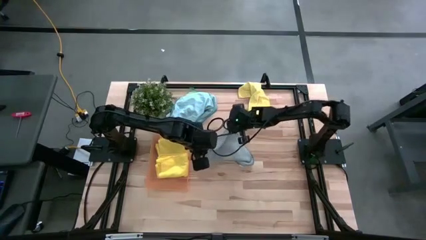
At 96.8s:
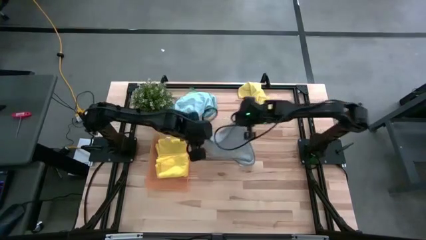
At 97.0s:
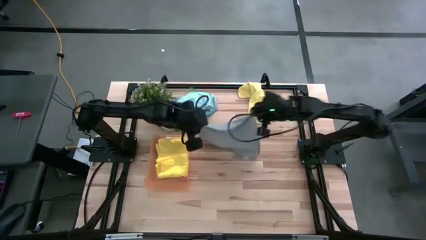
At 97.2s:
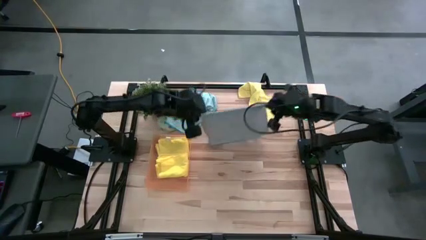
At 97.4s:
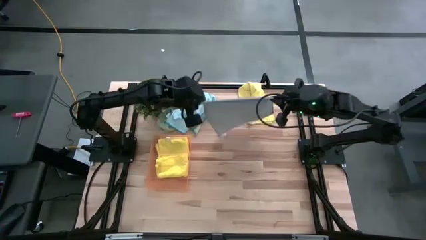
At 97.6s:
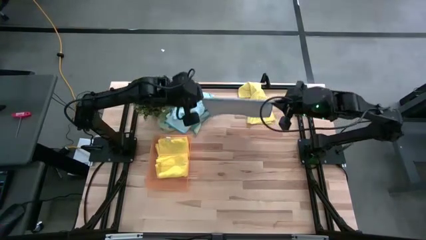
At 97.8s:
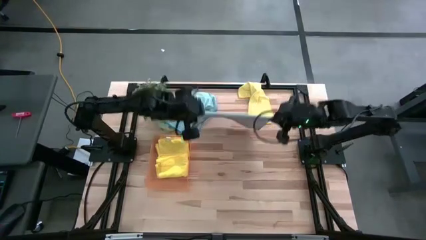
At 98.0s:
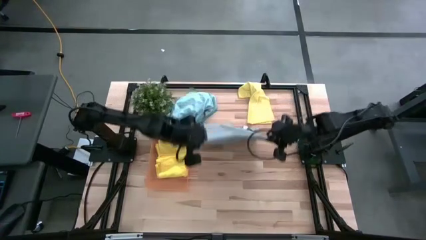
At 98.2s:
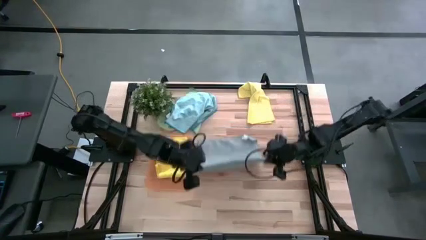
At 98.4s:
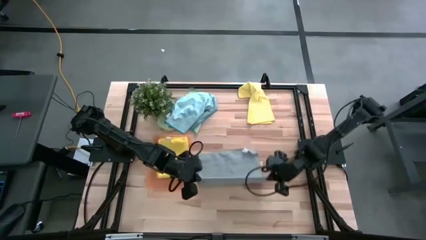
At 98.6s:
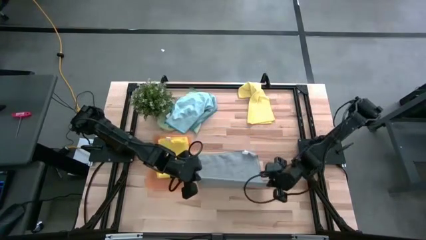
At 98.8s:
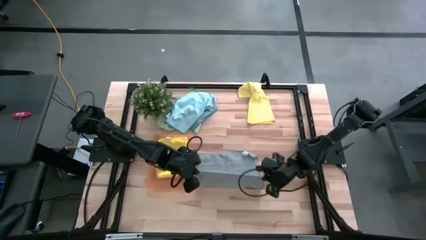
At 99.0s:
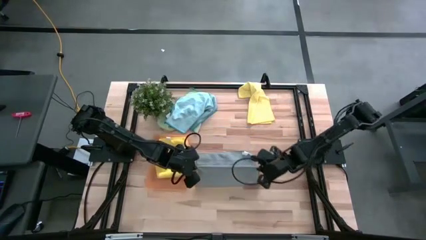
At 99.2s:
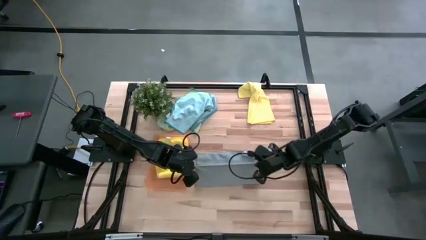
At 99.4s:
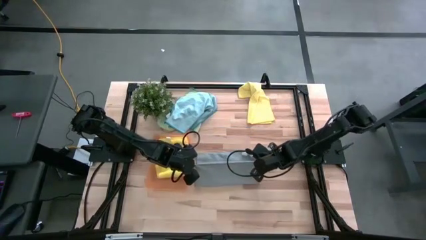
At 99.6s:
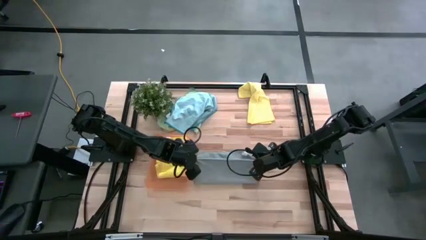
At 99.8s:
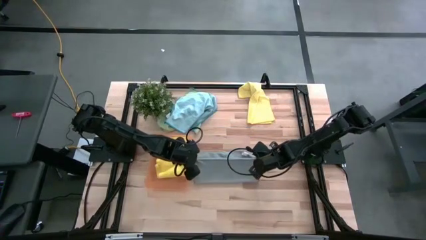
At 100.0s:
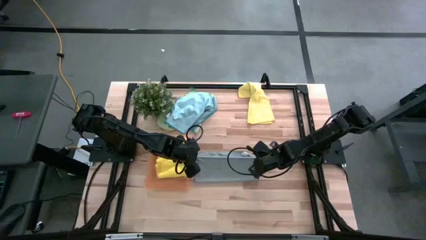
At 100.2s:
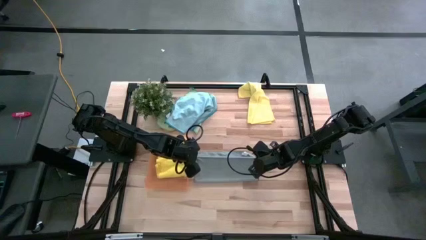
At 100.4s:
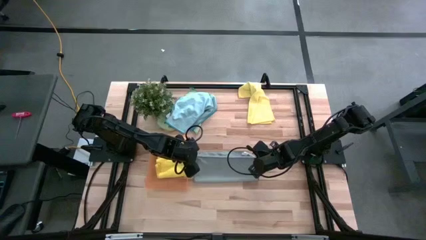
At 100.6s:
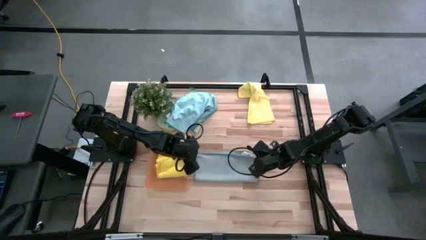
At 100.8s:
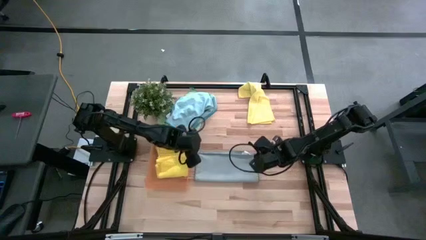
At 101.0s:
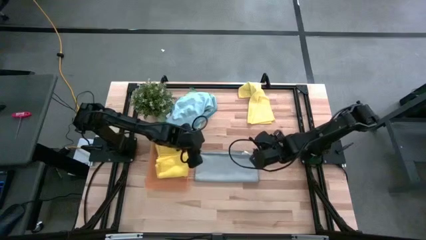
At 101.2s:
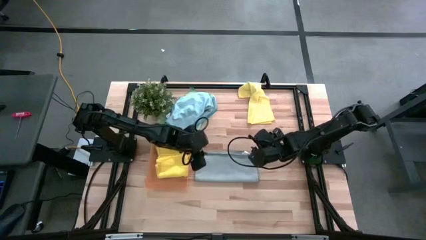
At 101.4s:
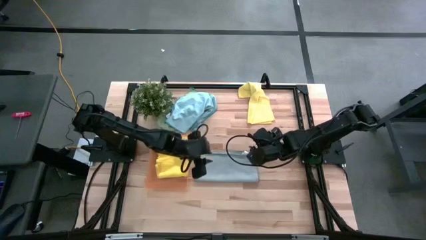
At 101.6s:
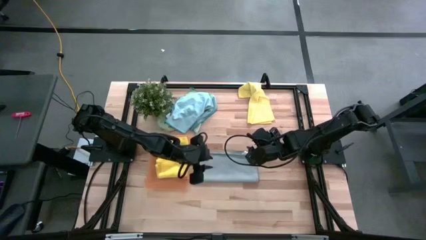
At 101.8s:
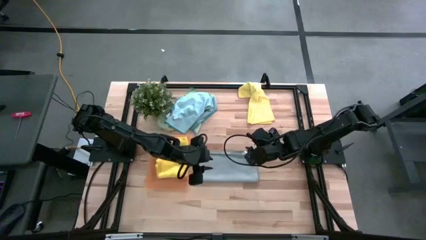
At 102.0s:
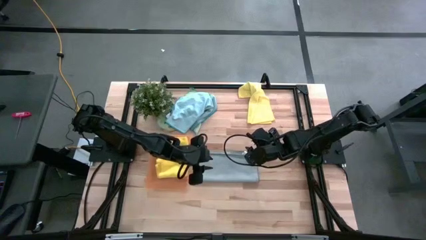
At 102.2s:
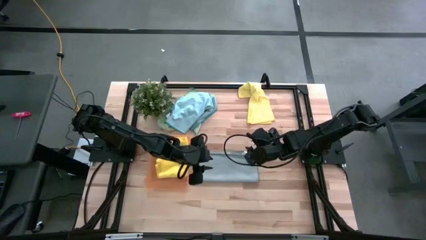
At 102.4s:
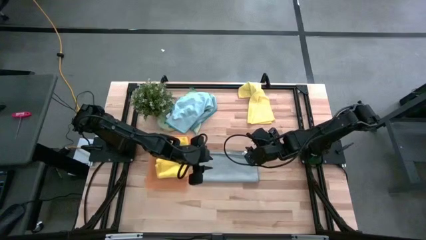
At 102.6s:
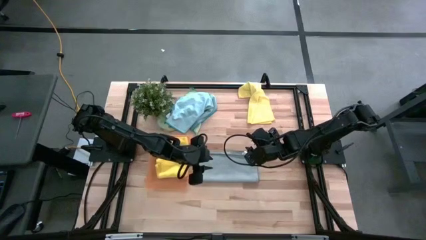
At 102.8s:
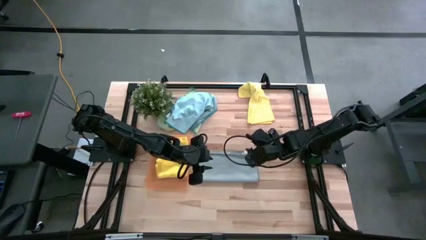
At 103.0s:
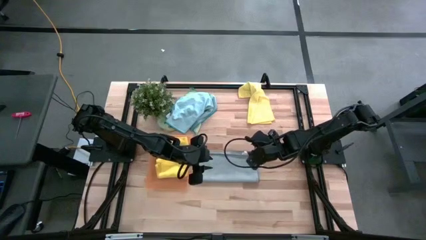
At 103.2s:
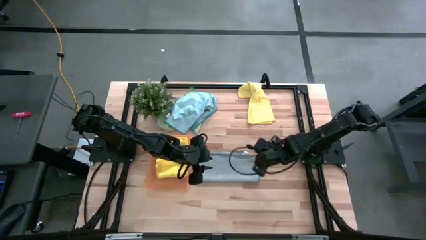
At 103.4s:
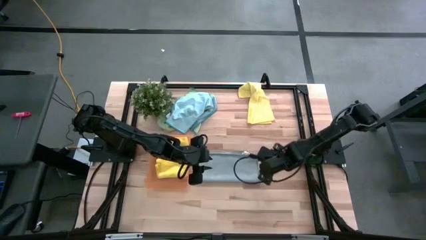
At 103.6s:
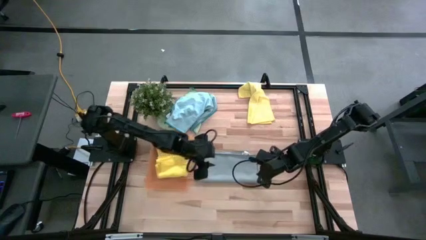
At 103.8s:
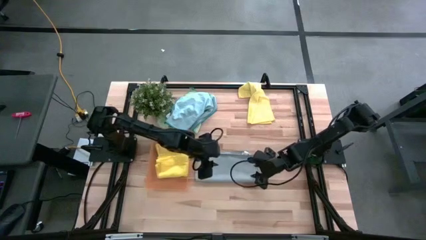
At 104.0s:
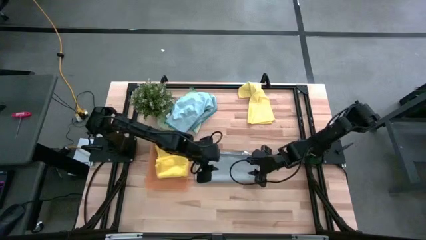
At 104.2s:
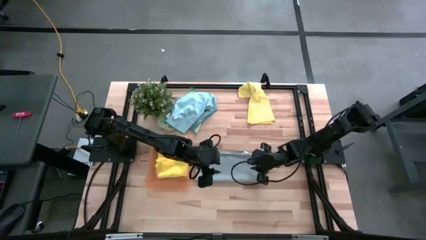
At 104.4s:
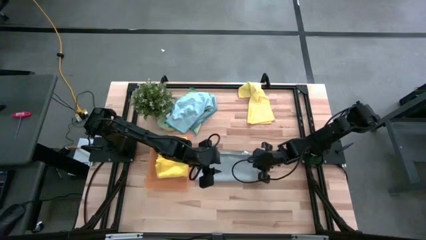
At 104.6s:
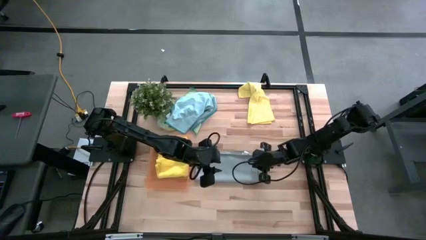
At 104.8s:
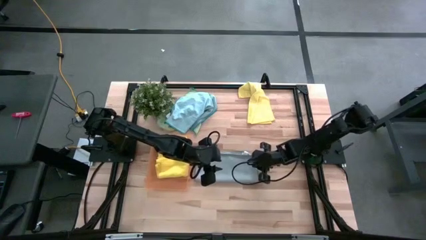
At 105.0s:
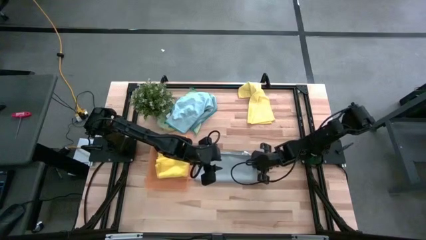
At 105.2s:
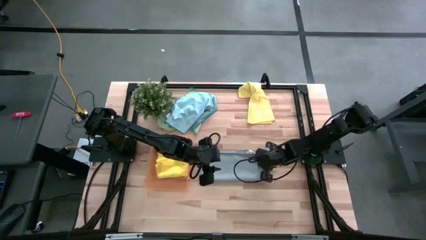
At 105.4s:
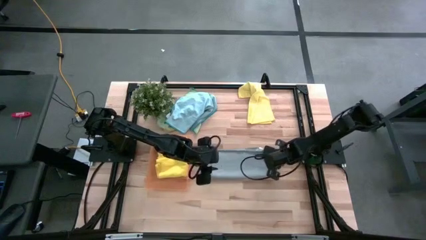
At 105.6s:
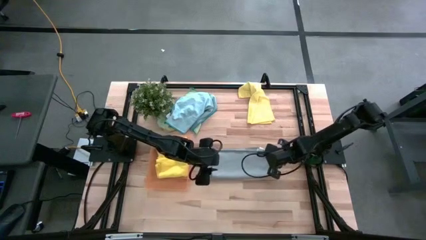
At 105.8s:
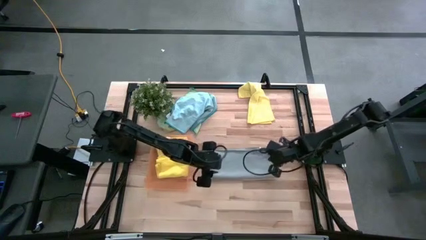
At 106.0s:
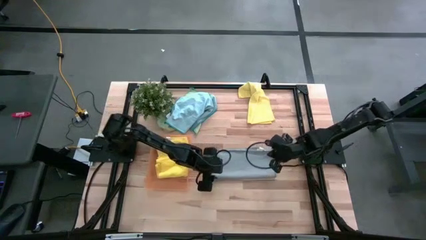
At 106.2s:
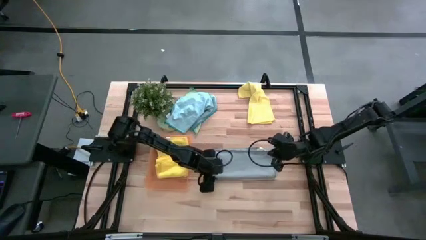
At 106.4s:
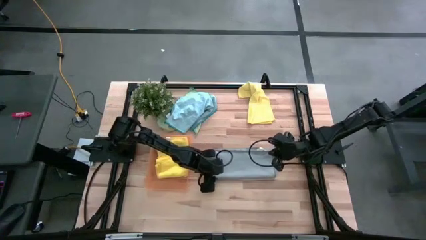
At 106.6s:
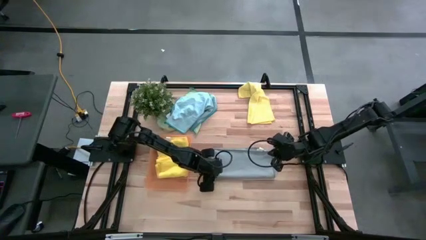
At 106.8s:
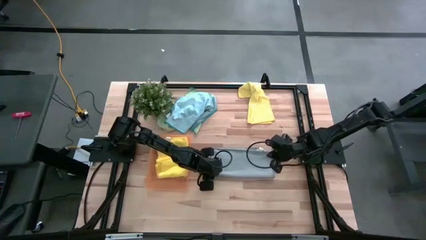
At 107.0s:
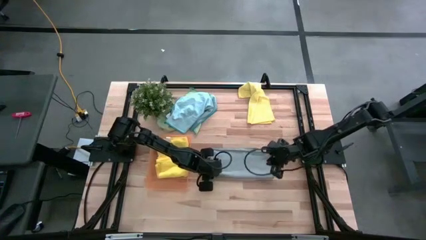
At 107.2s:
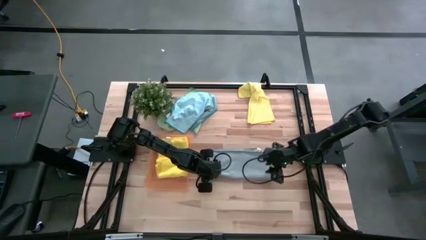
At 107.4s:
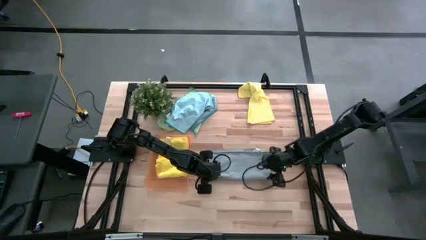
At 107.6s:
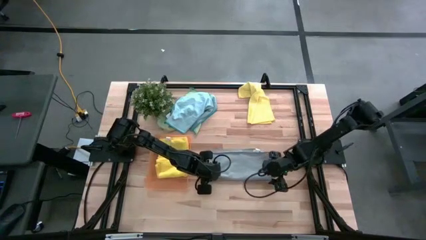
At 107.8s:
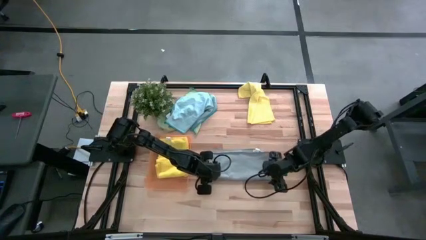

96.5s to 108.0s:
Task: Fold microfiber towels
Fold the gray microfiber towel

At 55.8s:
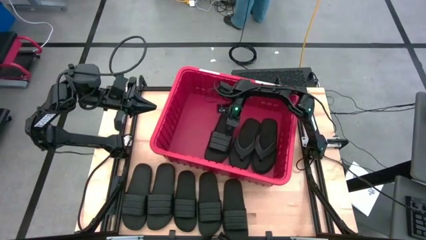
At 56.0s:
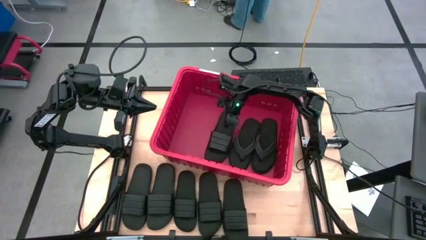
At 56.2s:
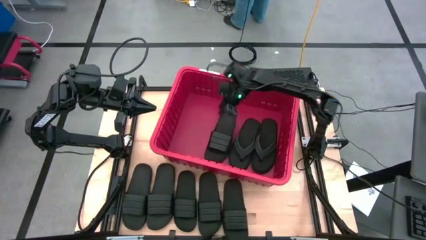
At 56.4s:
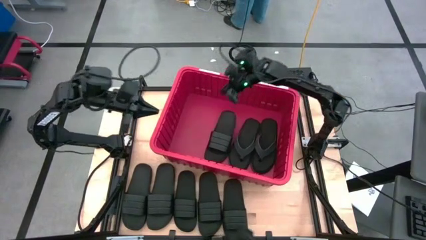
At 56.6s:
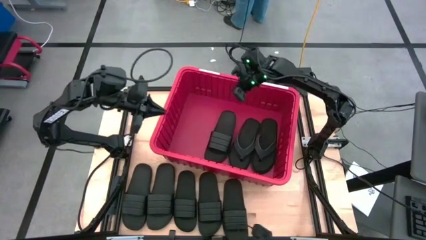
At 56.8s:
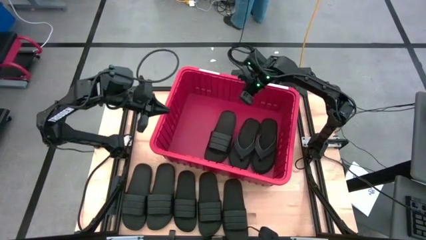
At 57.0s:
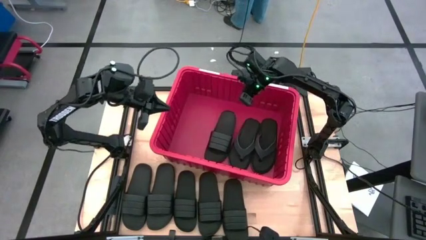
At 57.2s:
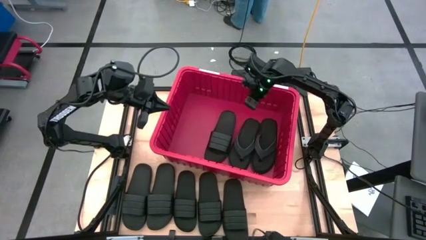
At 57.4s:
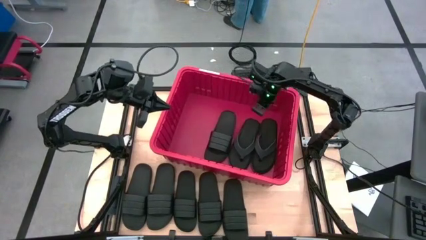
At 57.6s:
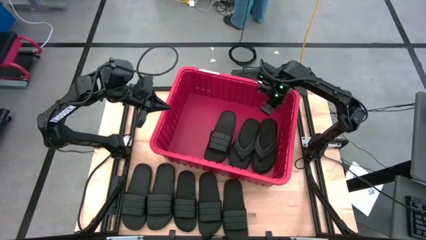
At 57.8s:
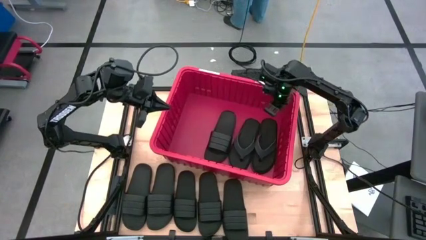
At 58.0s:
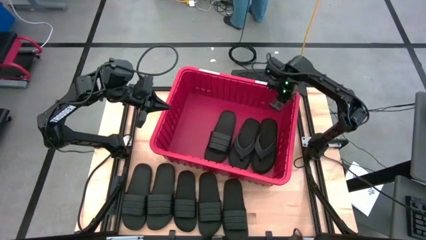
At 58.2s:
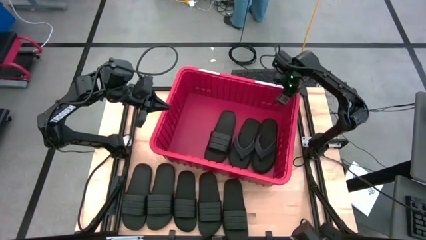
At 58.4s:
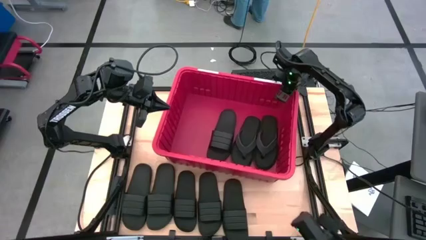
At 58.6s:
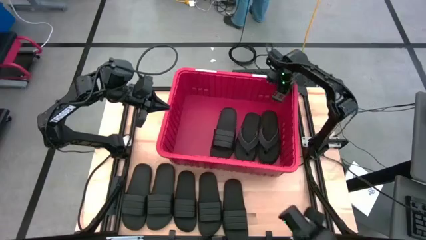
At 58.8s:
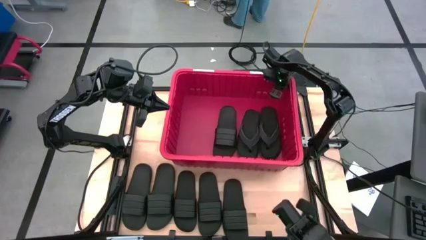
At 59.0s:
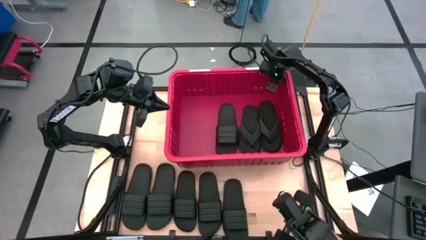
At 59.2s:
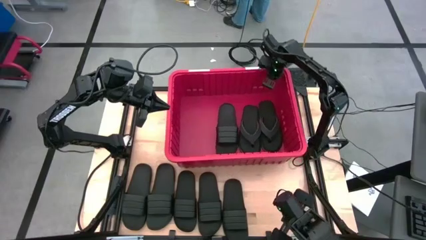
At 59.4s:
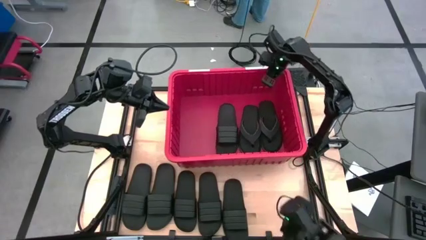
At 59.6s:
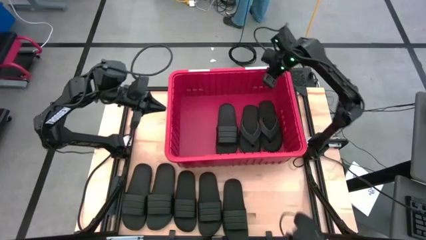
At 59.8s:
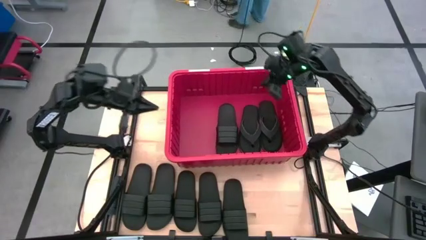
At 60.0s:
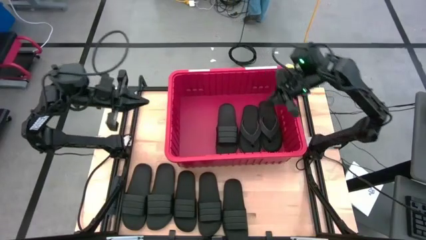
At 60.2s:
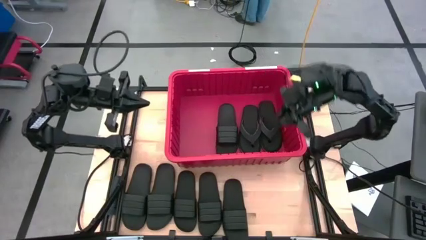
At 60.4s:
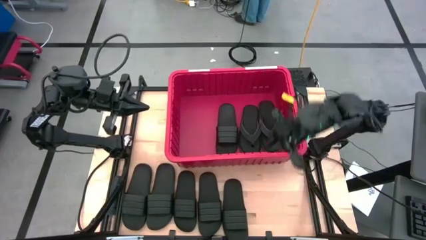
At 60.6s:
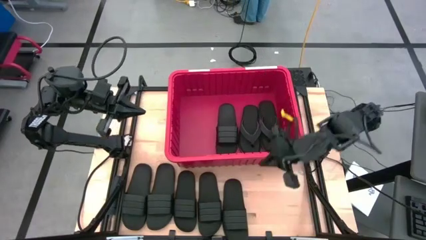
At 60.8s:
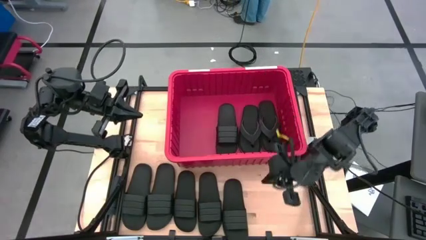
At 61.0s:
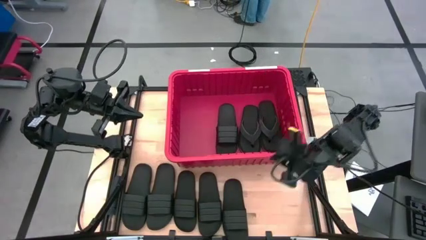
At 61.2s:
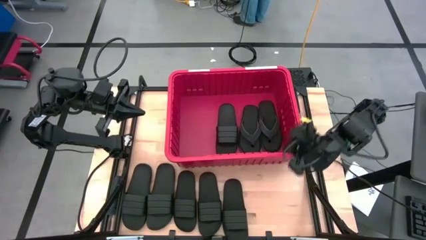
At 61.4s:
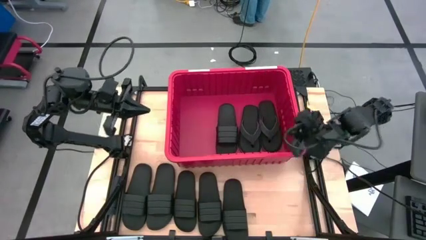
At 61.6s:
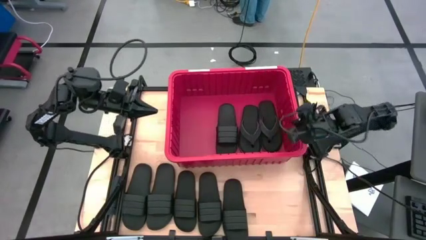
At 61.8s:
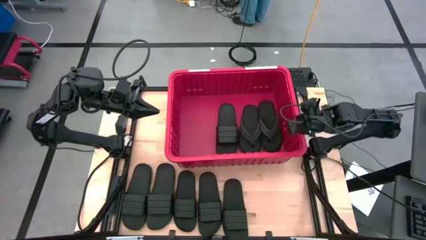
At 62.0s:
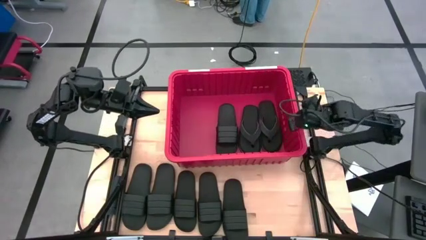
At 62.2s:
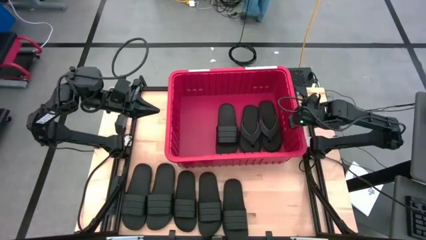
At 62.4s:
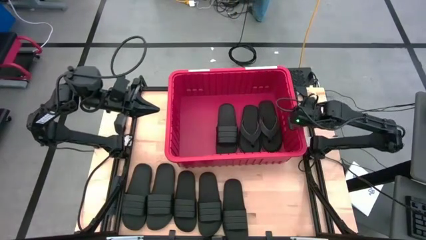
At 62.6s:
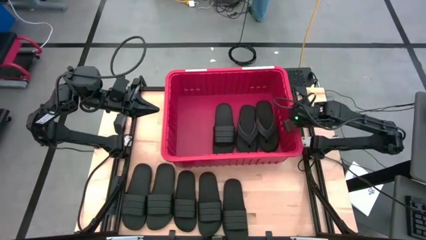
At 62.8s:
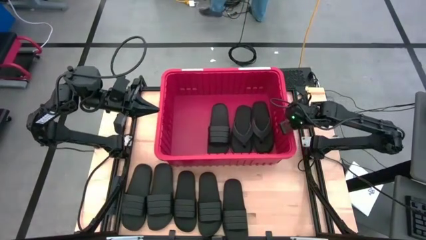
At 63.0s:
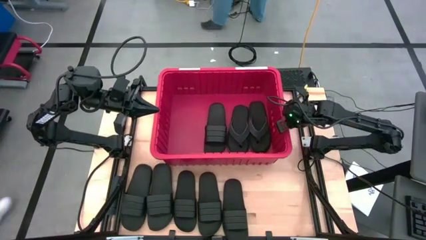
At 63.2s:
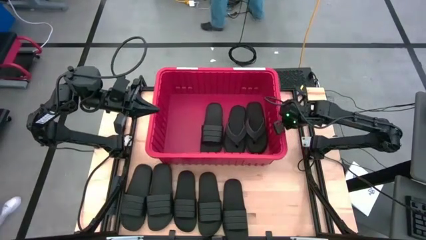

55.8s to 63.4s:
Task: Pick and place slides into bin
Adjust the red bin
